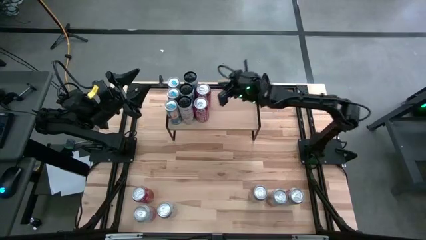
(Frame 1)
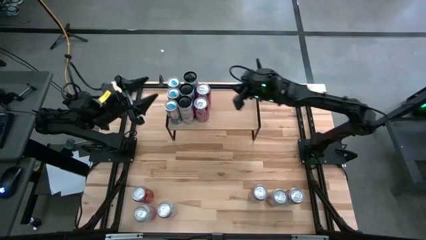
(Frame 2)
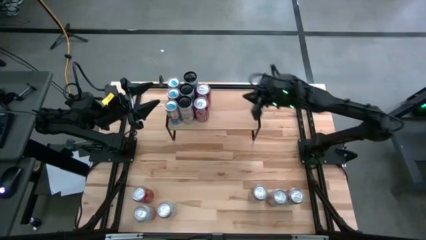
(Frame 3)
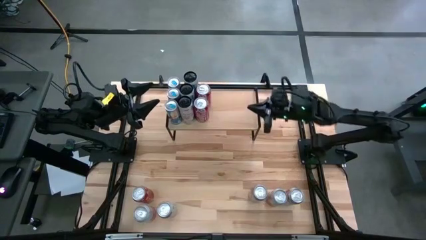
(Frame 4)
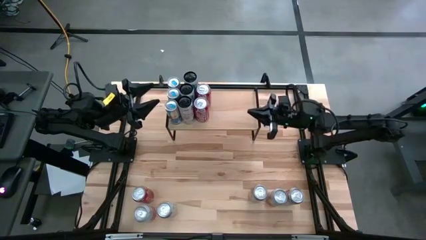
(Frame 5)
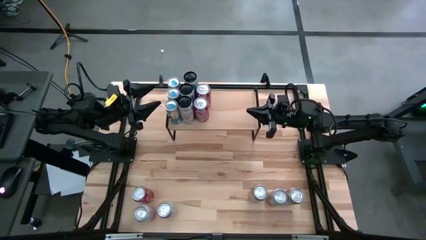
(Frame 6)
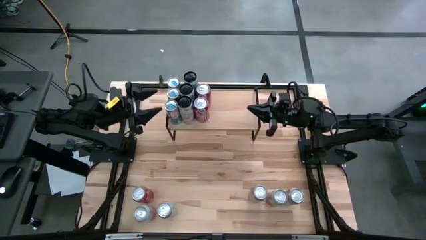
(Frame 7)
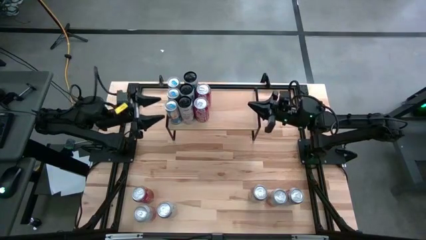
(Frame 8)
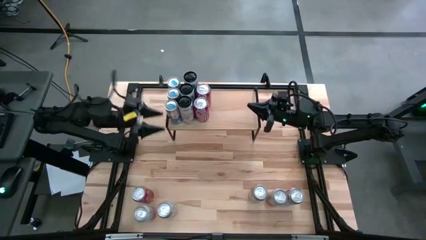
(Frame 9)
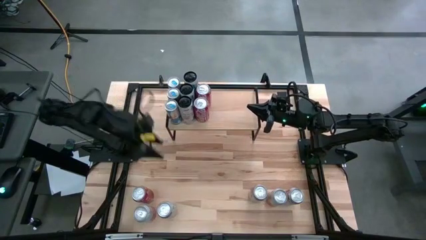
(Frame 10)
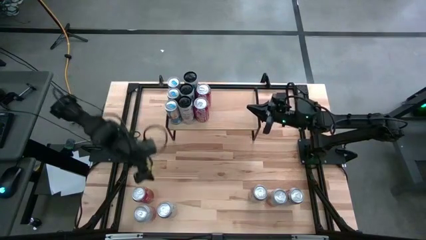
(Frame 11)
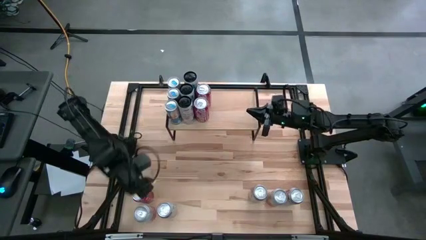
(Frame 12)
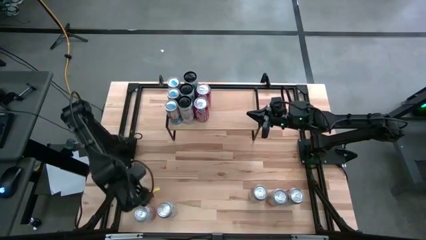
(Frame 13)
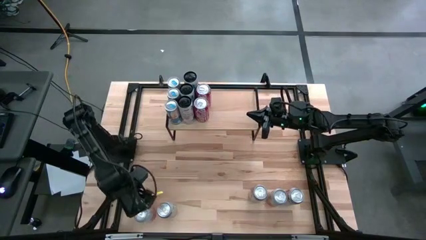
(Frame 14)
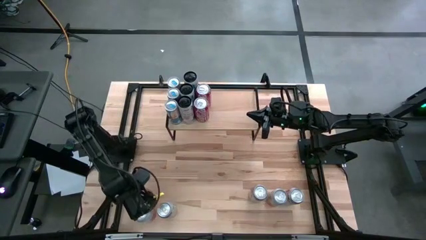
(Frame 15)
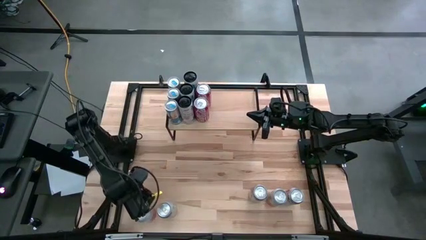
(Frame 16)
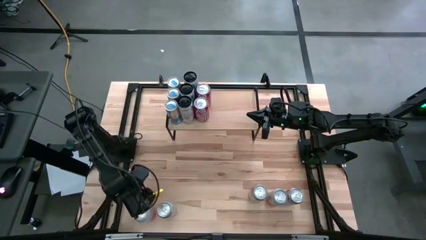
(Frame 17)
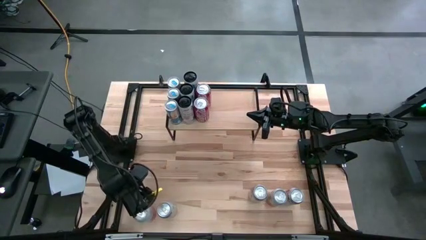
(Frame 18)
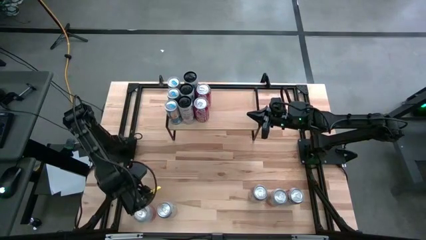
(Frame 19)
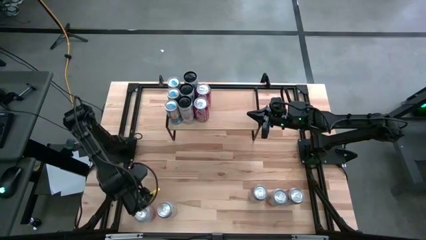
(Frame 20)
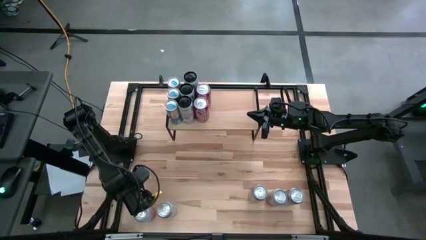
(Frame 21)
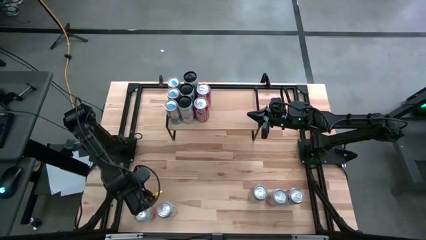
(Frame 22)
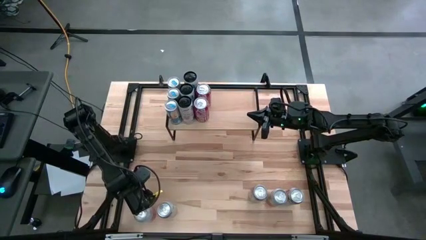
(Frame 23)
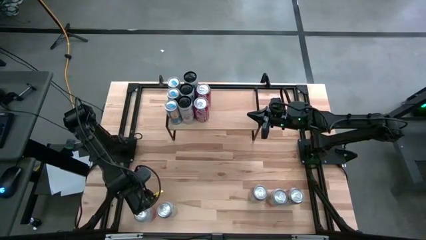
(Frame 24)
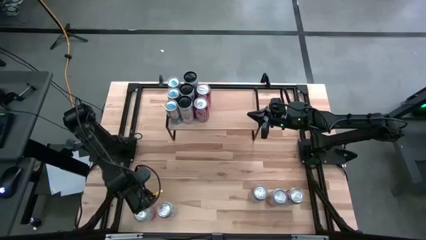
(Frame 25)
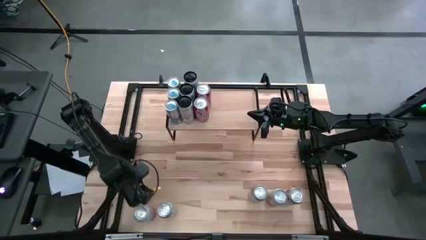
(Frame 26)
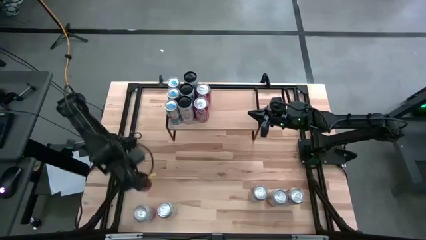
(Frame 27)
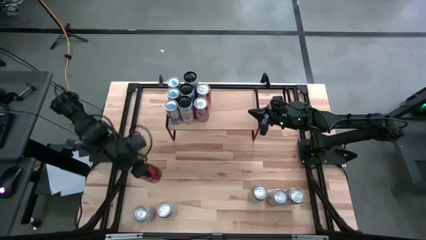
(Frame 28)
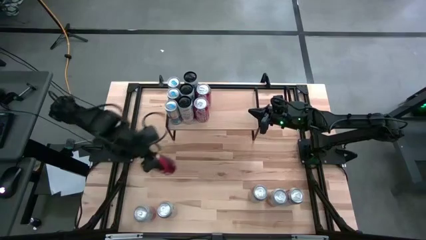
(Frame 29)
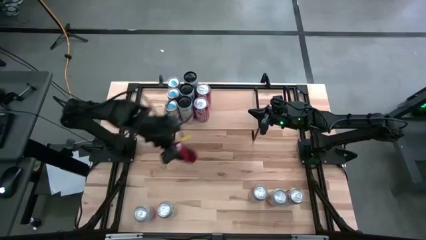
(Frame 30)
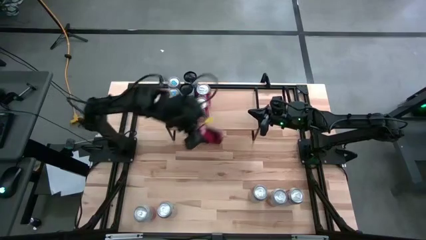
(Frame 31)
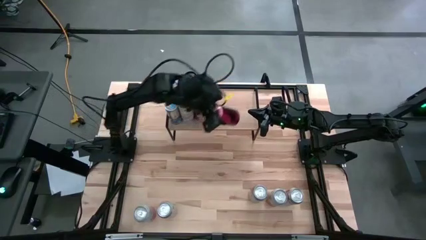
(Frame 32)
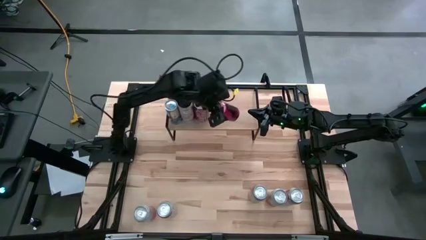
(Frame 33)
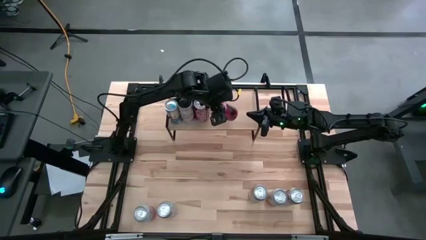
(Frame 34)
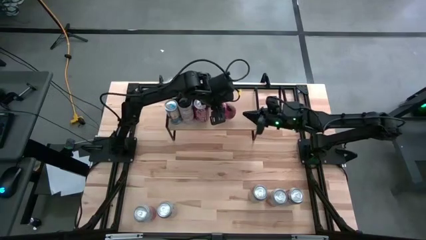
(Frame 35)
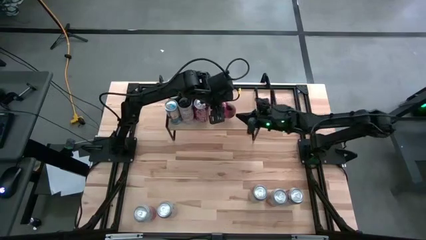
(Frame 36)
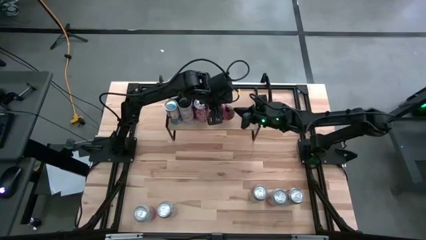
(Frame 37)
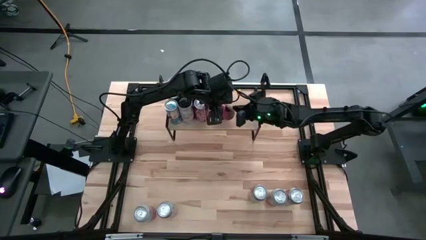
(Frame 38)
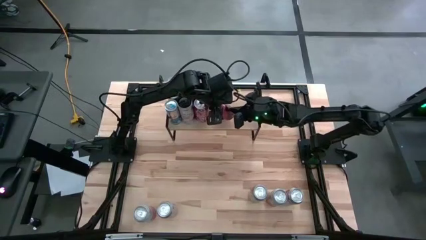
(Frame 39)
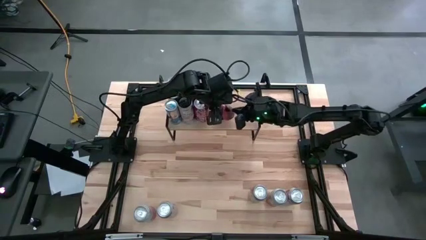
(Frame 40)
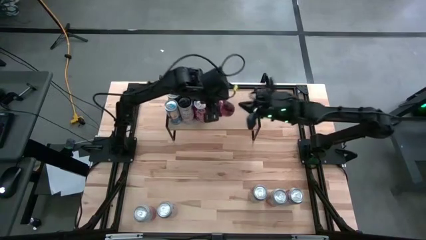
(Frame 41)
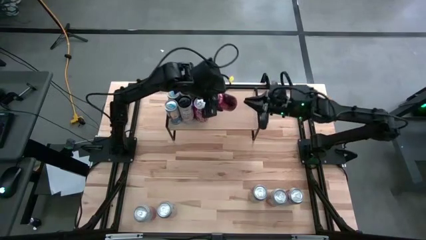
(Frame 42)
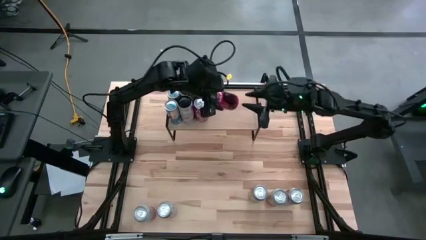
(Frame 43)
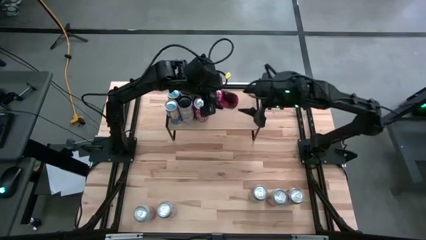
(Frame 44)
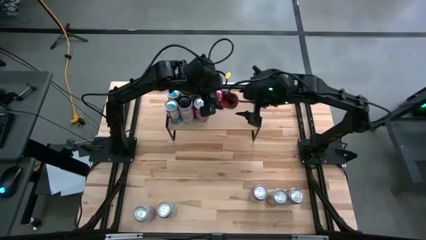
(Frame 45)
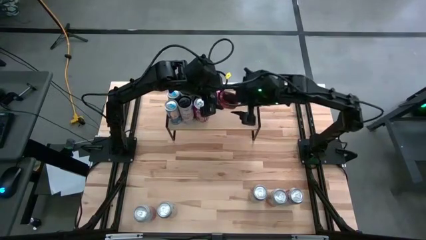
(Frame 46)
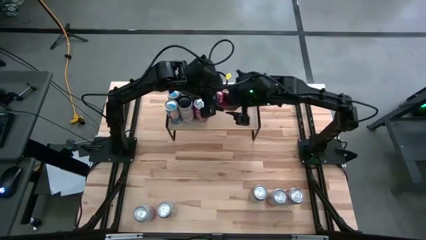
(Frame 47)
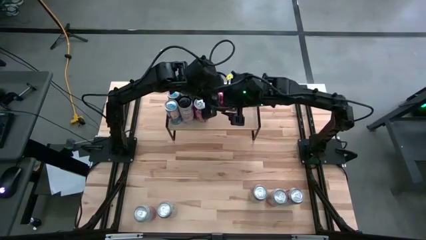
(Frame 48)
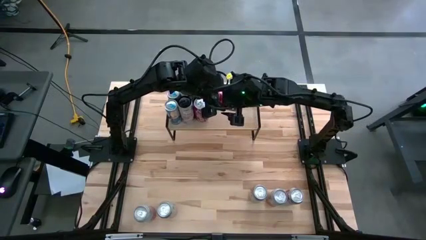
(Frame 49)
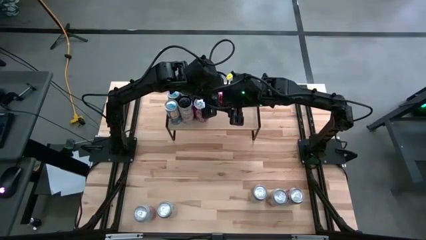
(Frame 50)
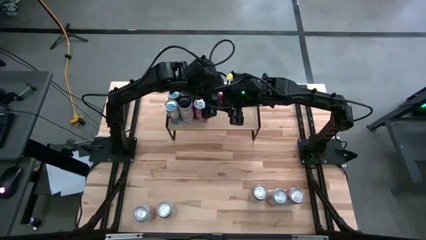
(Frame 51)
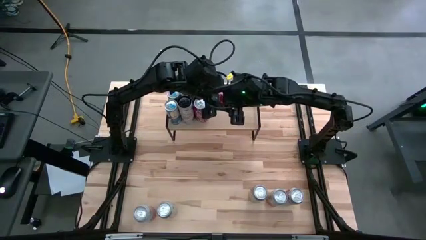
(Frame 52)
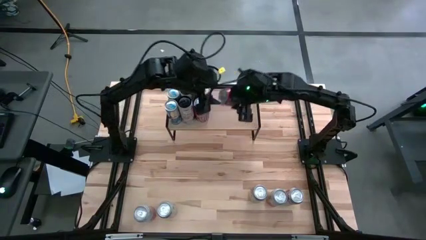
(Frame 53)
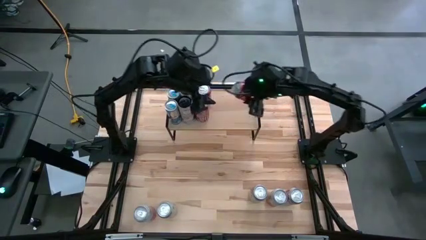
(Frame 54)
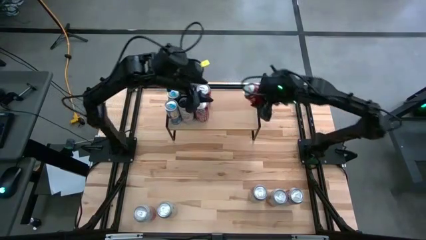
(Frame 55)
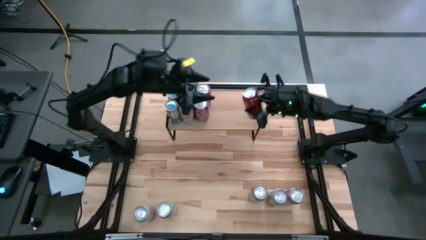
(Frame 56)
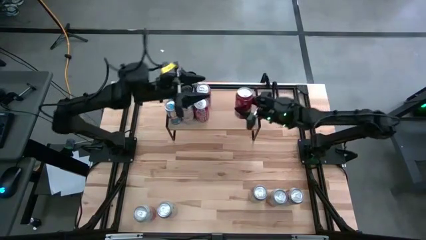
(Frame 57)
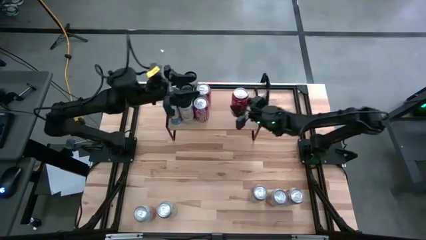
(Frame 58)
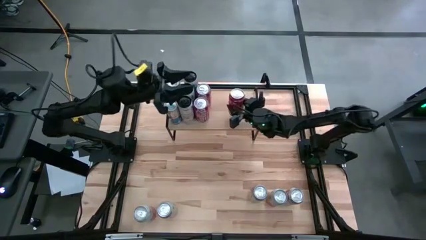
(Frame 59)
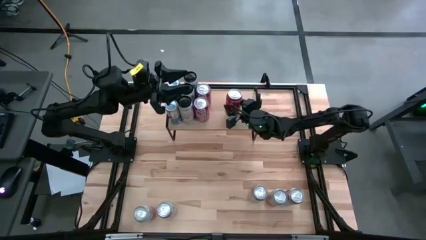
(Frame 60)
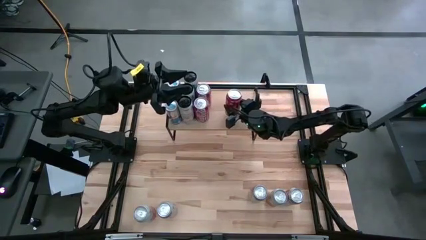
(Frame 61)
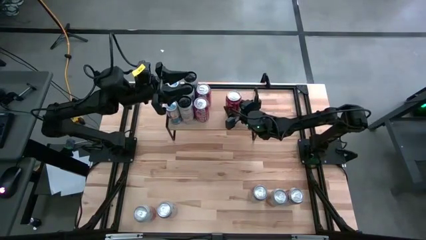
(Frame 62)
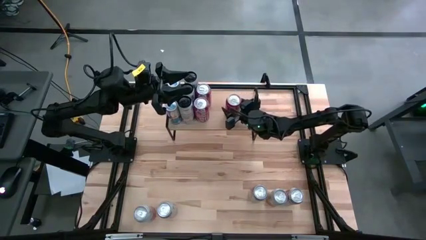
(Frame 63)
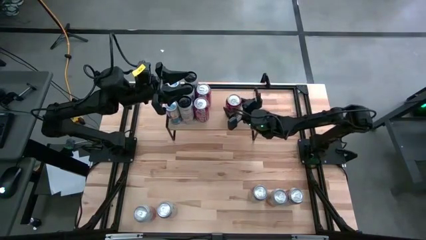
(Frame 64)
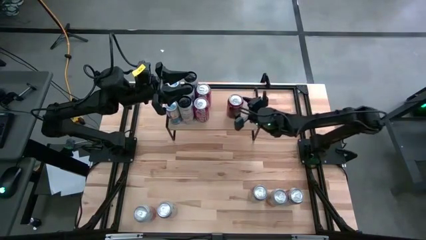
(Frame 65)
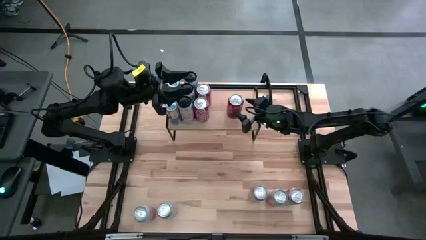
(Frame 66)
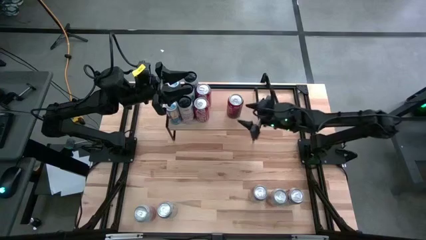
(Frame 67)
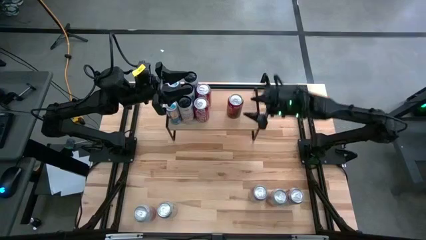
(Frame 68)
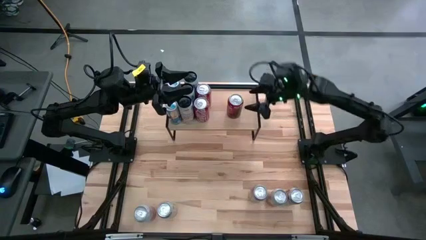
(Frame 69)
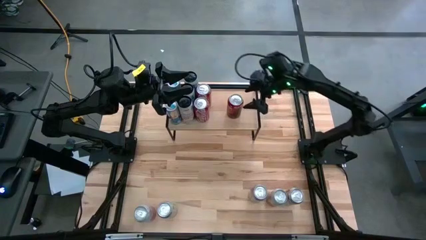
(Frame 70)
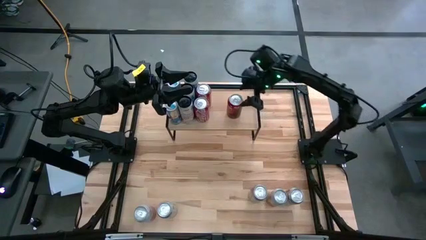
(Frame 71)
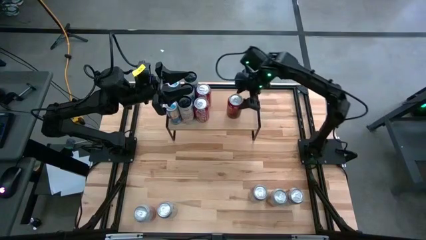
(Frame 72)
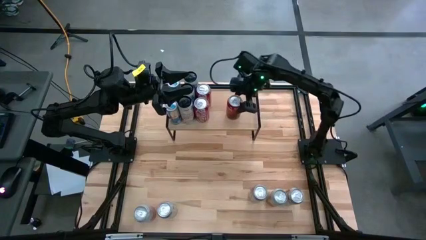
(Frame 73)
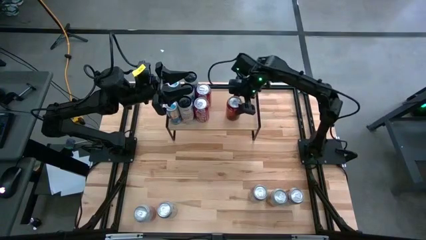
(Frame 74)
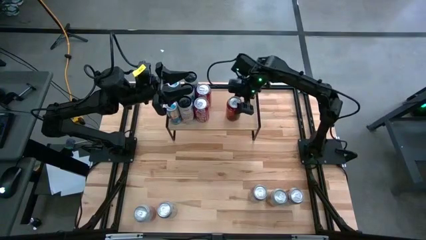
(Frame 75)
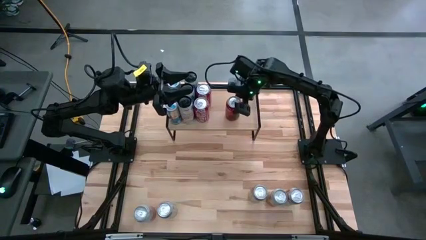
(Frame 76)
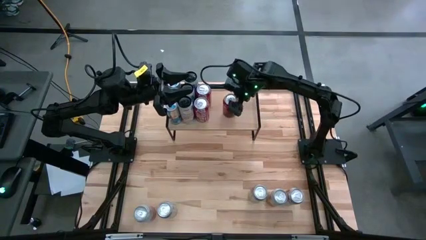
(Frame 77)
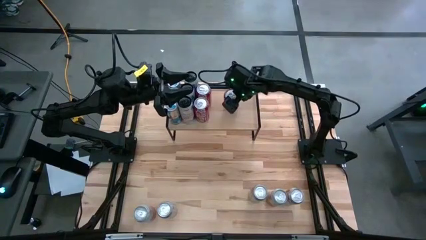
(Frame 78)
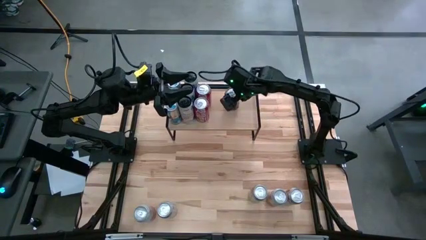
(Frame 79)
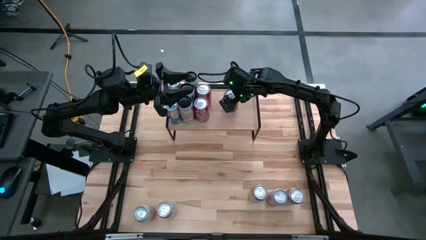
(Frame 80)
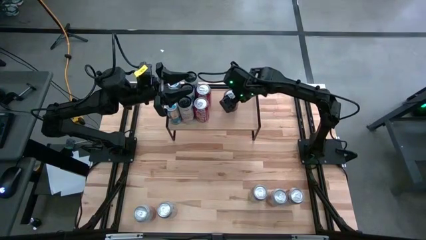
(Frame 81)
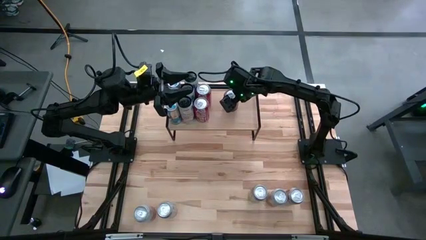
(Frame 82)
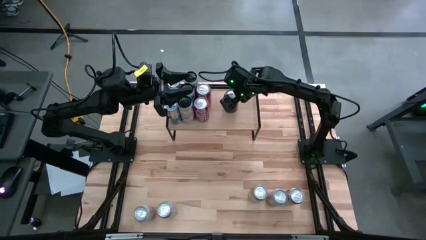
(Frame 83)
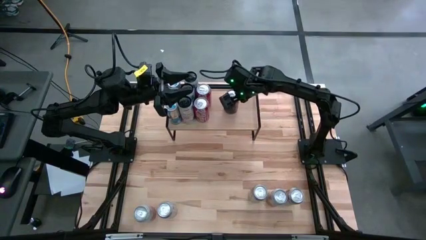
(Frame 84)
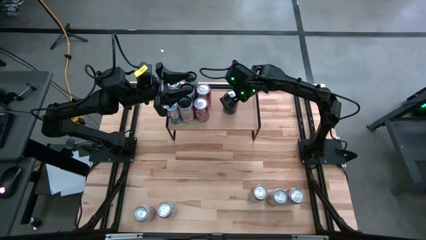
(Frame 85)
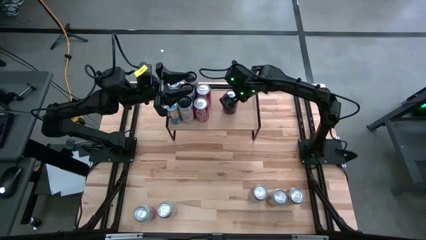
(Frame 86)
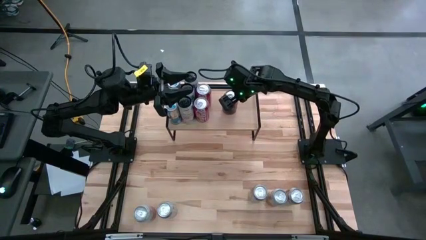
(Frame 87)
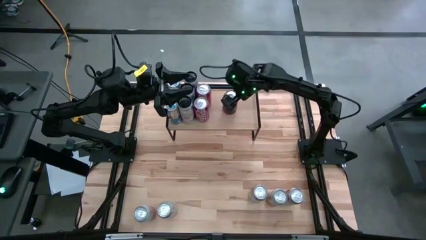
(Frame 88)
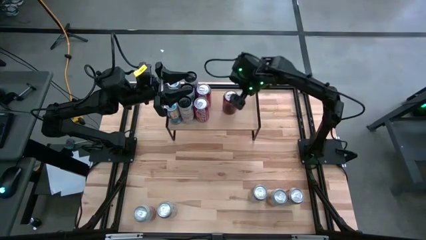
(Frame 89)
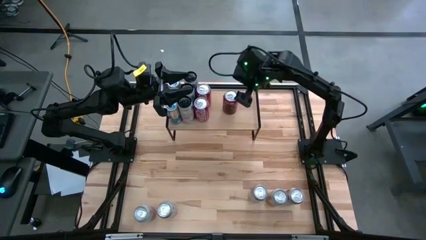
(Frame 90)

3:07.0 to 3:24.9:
Task: Place canned beverage on shelf
Put the red-white soda can aligned with the other red-white soda cans on the shelf
